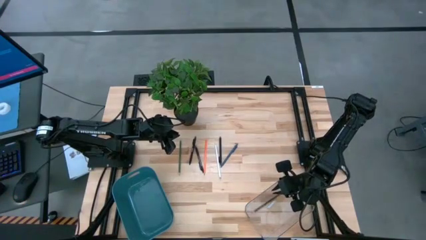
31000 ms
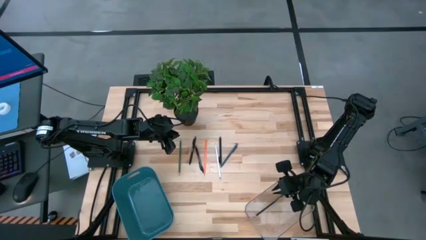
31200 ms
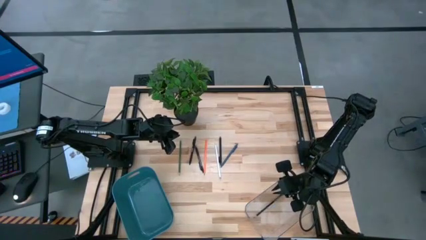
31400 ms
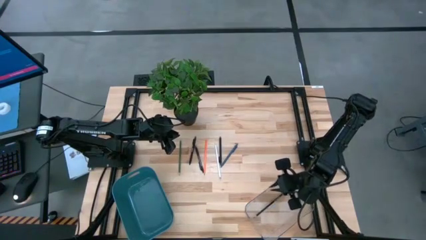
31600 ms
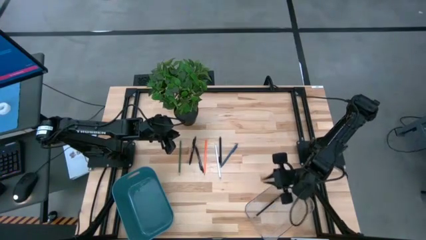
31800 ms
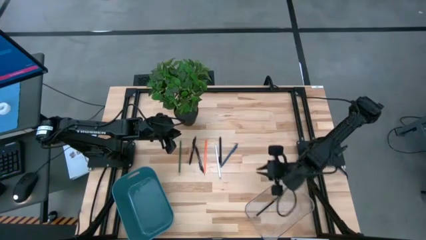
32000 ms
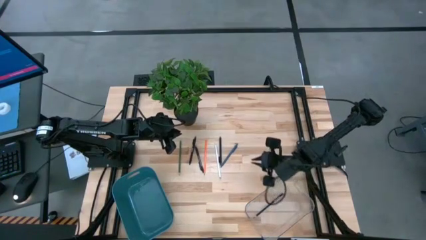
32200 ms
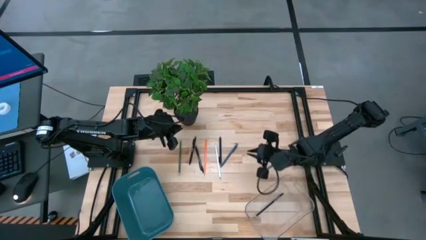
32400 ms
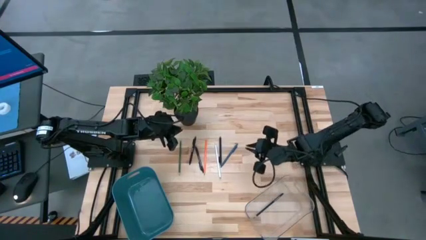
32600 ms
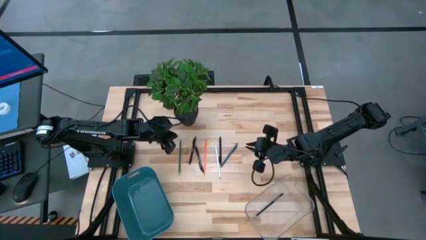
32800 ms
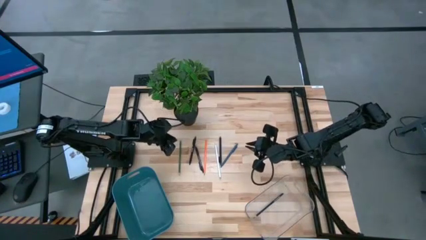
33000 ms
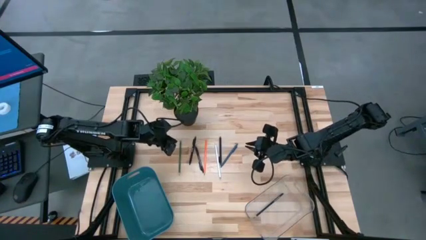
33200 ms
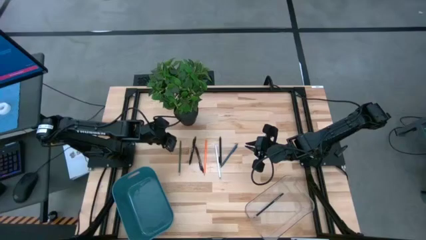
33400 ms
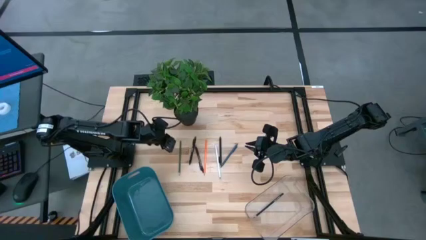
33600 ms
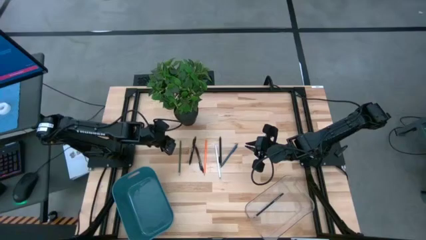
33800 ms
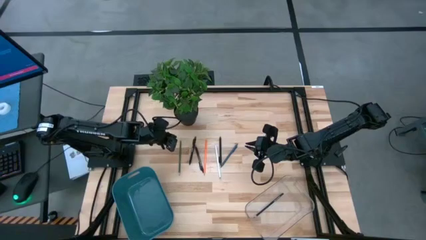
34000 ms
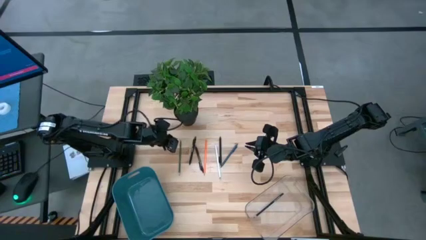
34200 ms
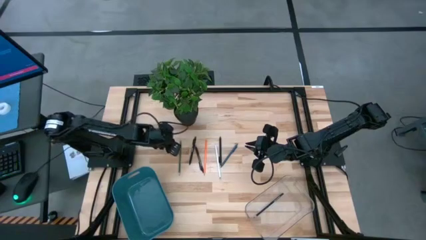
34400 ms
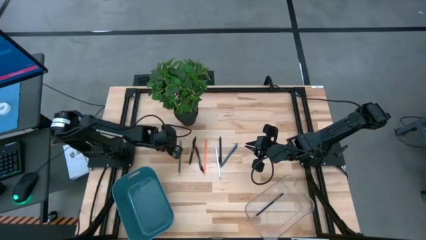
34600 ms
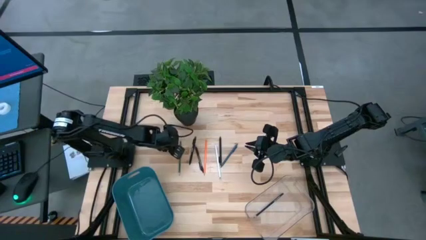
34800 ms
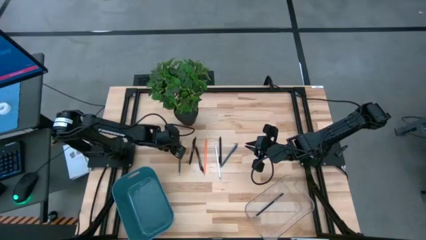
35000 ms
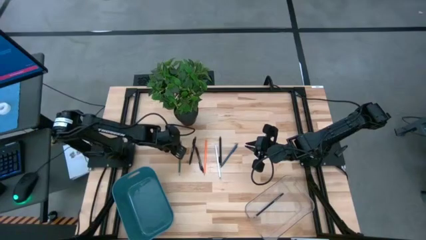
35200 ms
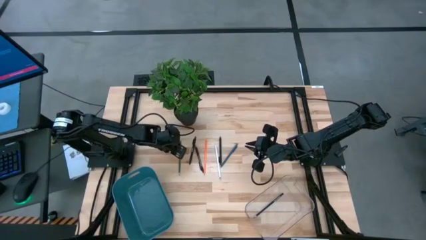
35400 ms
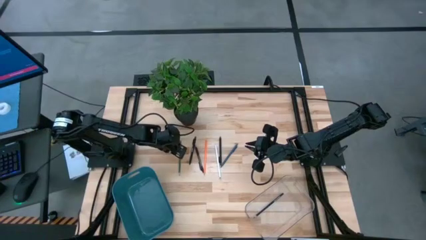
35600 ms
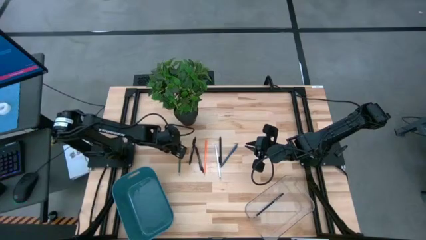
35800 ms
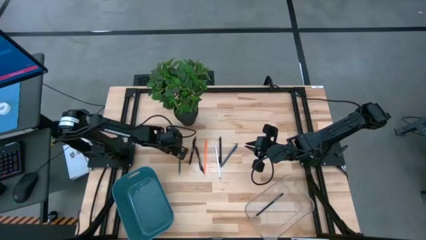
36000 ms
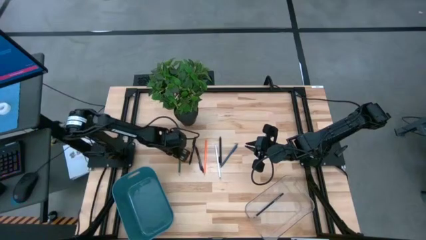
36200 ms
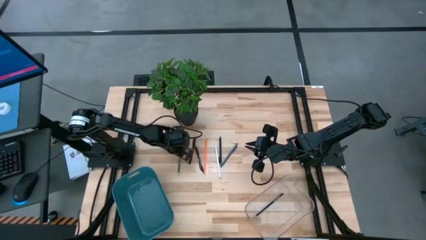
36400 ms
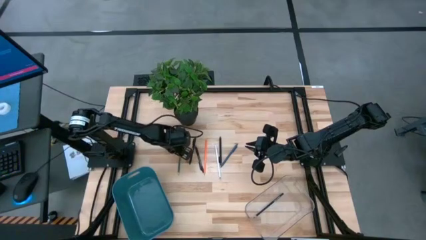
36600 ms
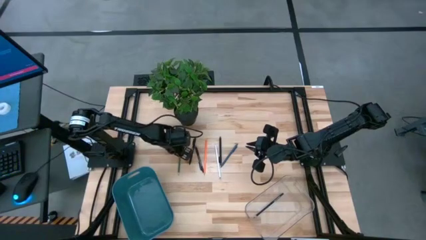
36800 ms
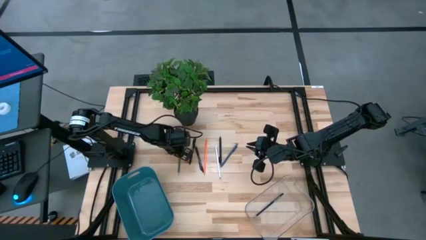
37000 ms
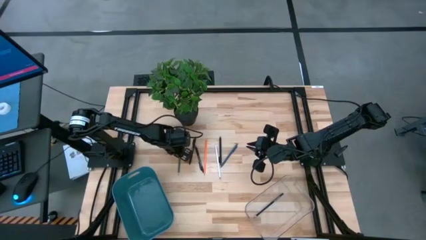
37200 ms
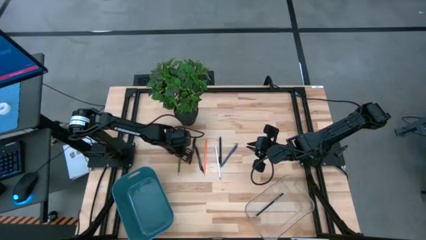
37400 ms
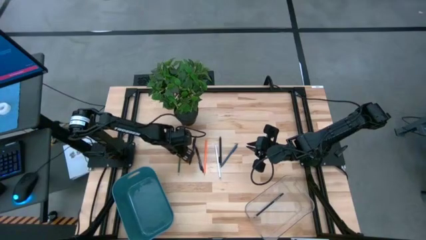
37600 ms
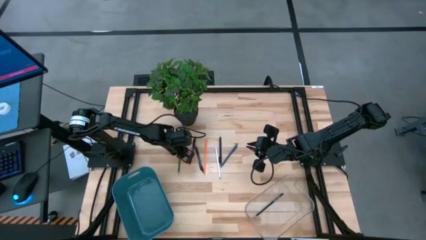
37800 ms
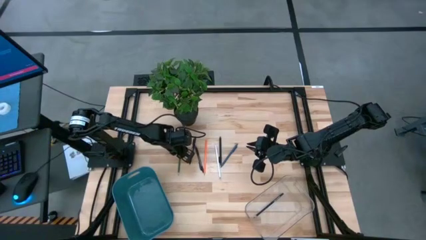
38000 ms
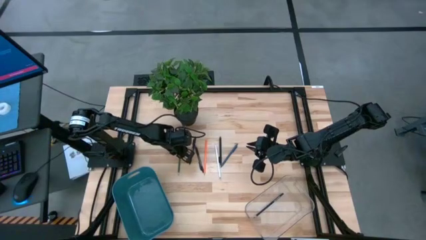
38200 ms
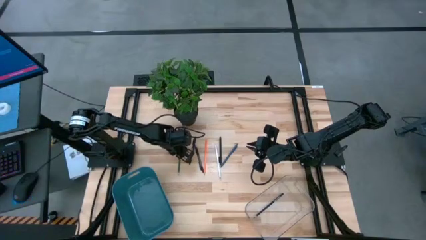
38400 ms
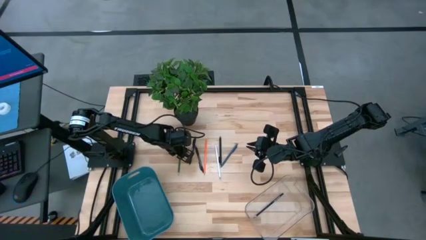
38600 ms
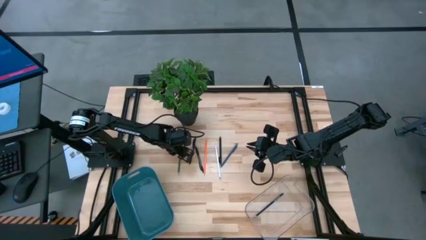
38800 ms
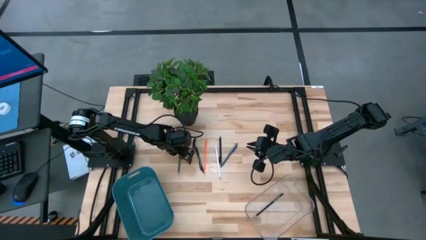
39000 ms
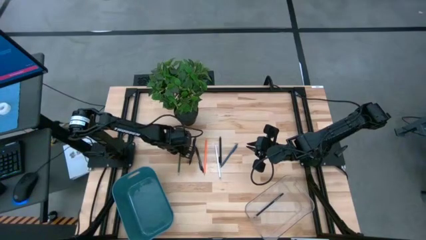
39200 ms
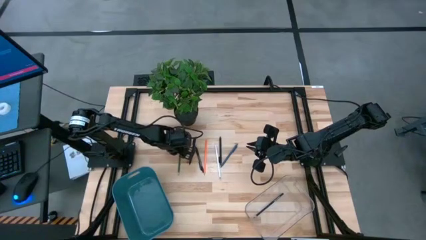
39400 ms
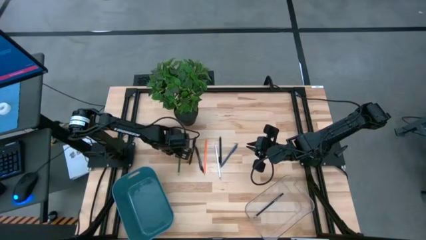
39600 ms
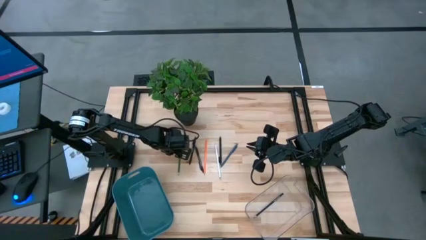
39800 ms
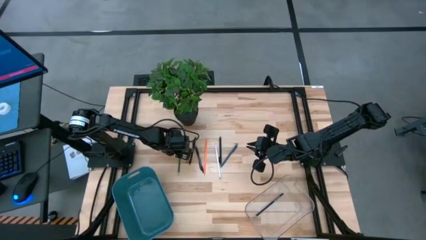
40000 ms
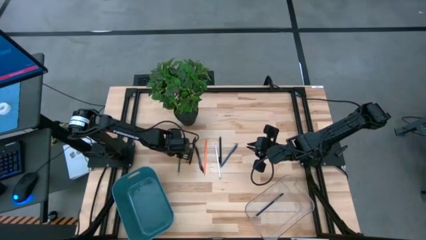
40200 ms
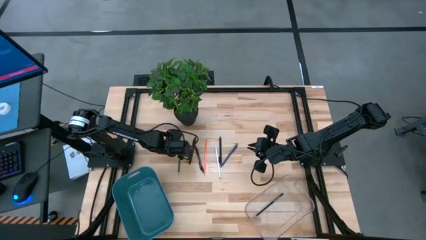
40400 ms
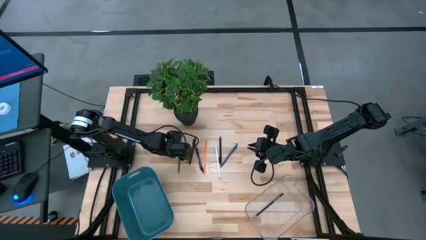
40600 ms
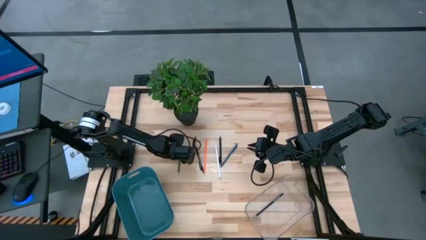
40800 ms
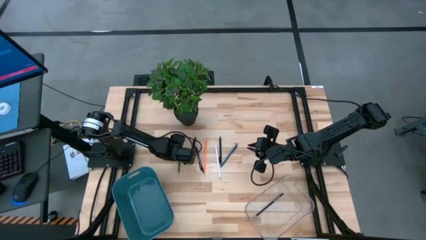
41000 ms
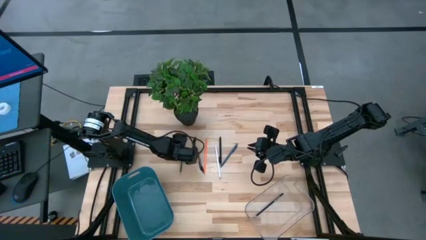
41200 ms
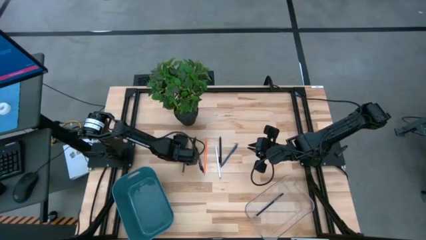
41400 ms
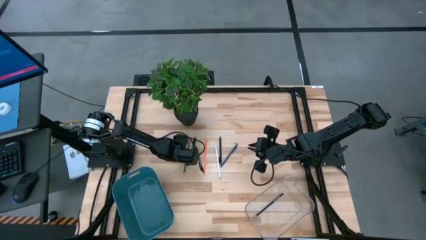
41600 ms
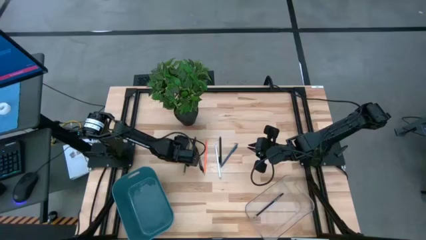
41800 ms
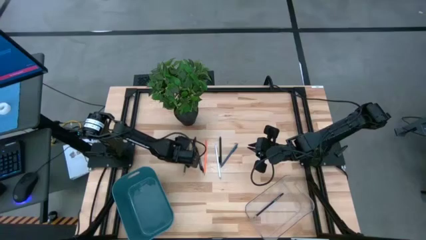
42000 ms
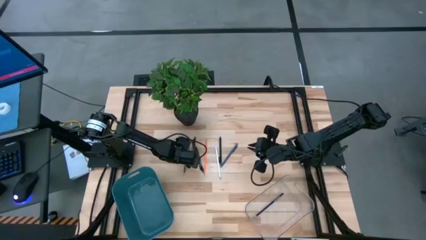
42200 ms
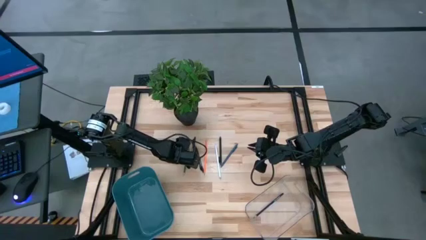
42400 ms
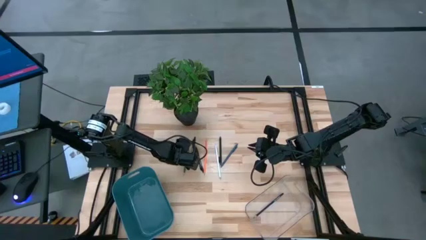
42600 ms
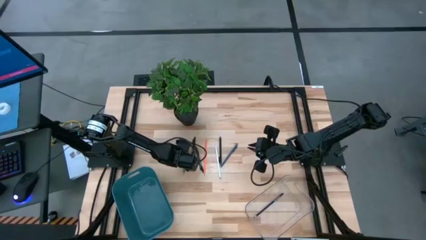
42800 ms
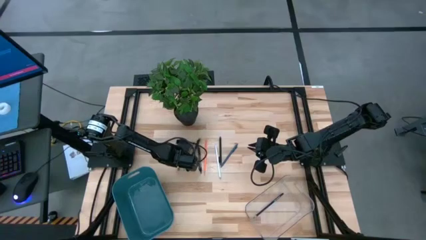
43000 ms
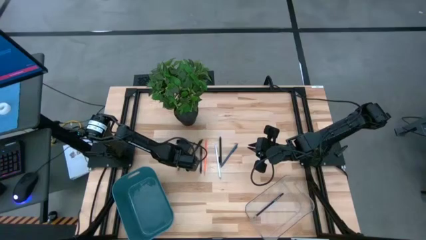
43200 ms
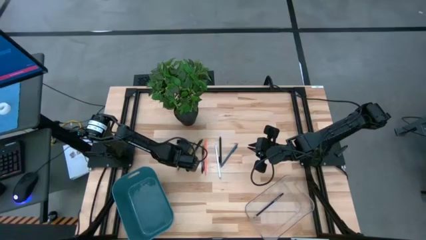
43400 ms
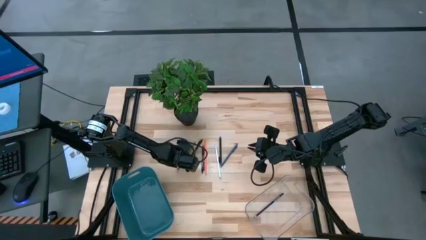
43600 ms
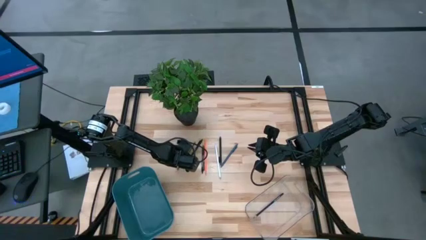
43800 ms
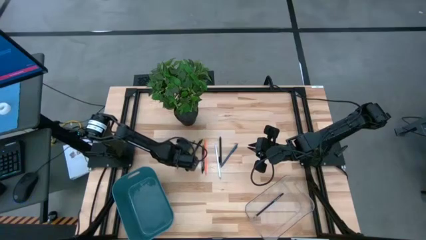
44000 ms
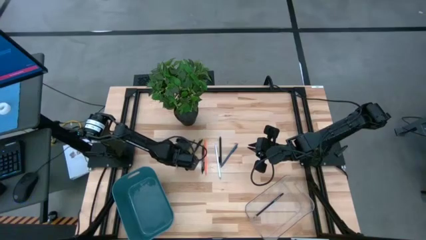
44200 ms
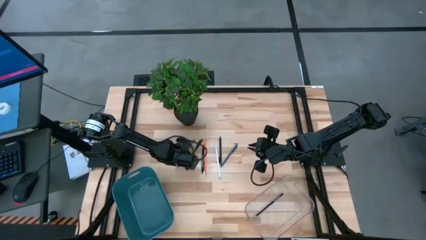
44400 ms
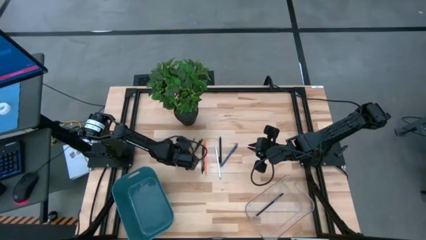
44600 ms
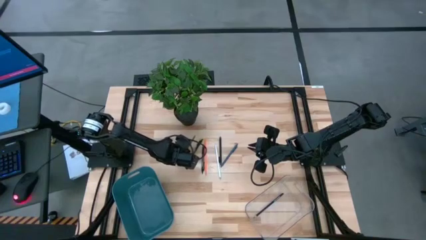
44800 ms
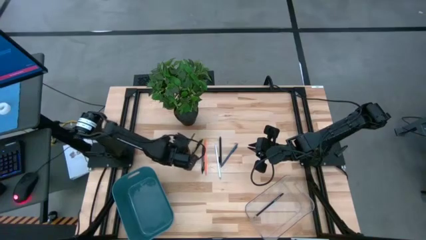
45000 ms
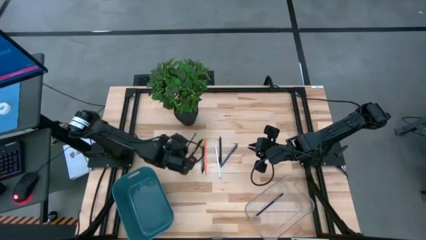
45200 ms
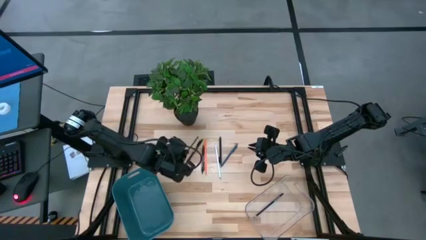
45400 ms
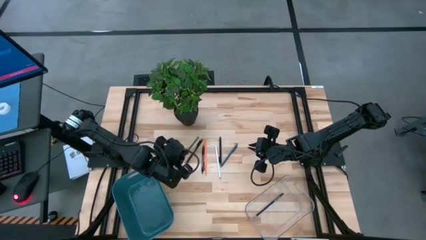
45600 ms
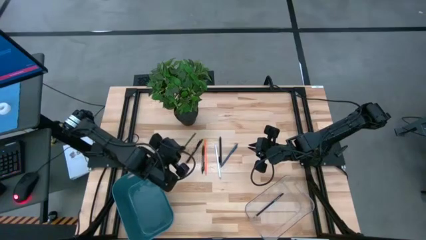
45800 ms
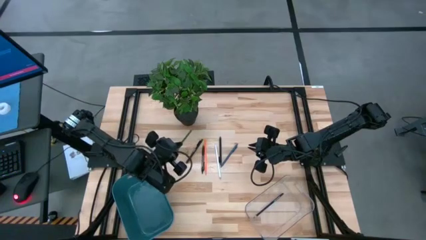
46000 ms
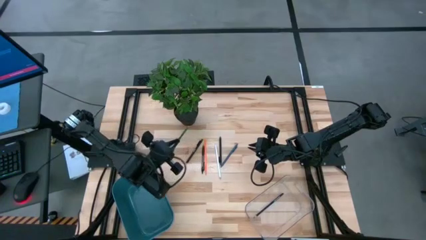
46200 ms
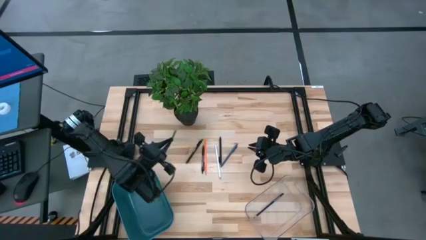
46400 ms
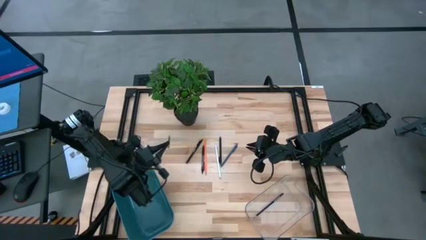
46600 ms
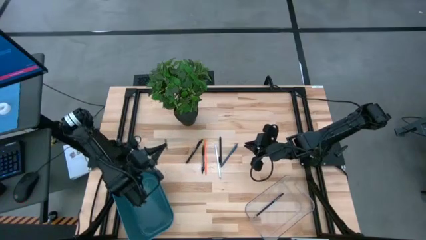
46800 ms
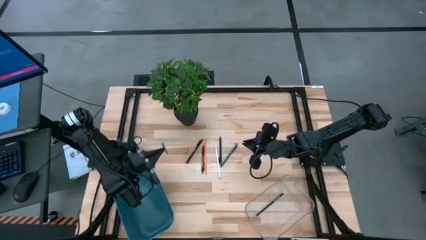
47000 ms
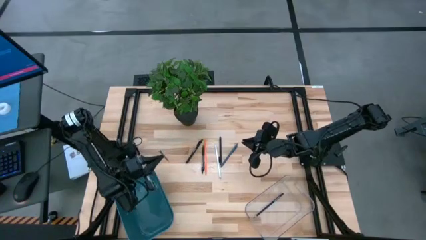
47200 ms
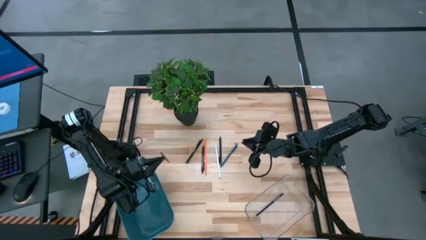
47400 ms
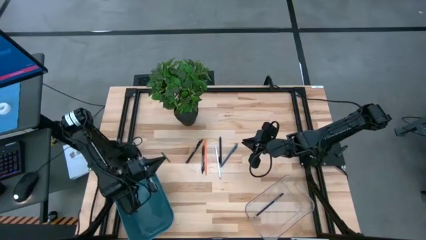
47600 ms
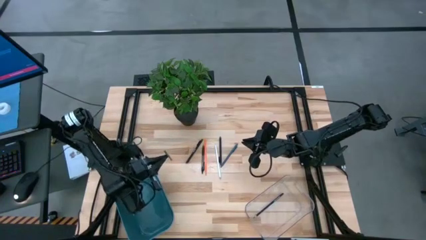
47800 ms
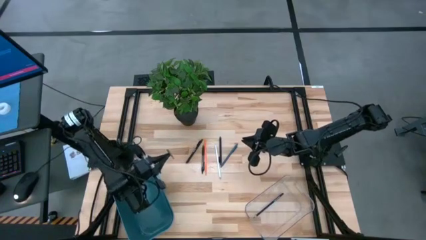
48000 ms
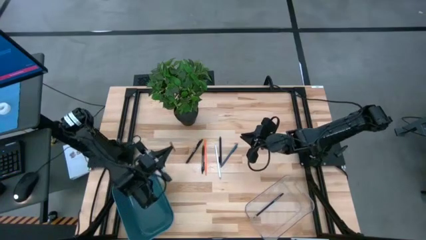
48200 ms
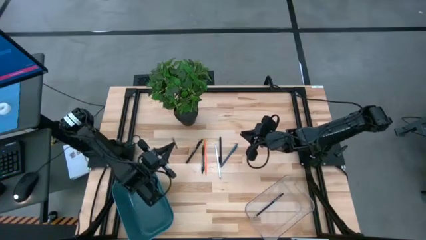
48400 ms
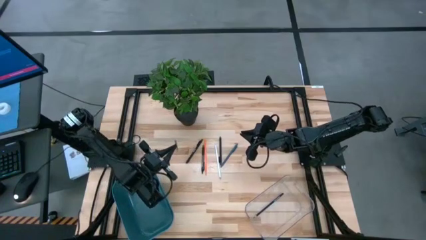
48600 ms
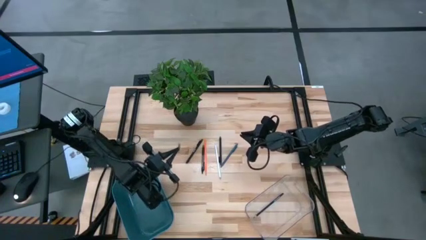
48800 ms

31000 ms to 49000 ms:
Task: Sort pens & pencils
Put the green pencil into the transparent bin
